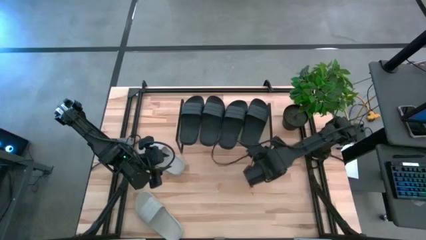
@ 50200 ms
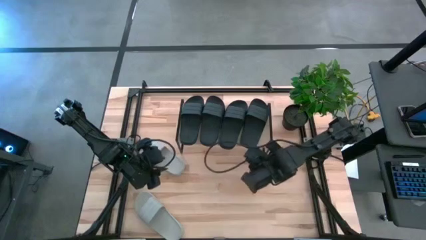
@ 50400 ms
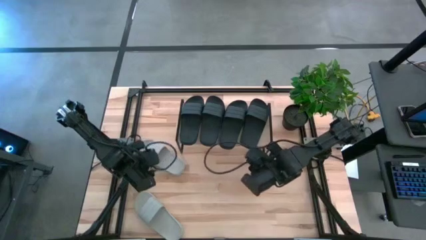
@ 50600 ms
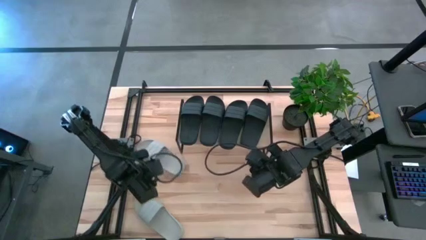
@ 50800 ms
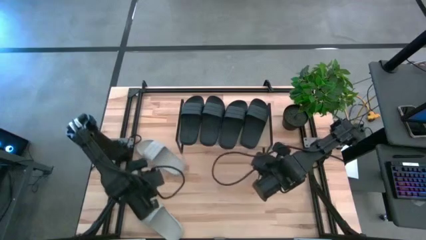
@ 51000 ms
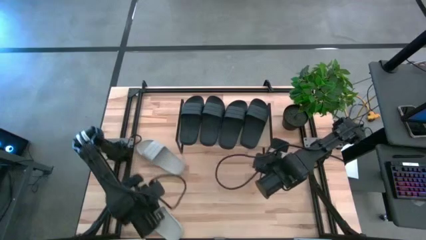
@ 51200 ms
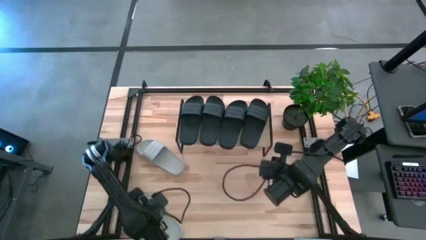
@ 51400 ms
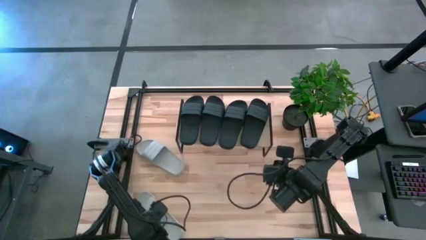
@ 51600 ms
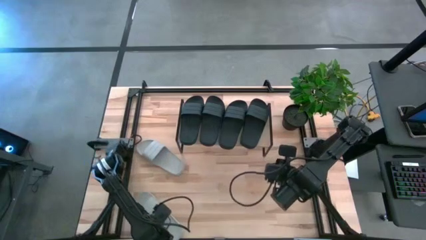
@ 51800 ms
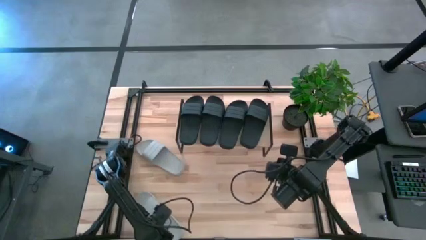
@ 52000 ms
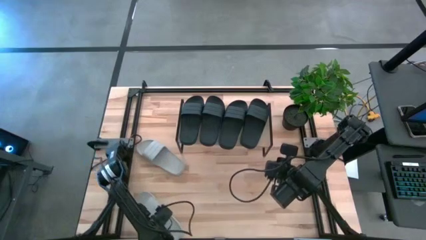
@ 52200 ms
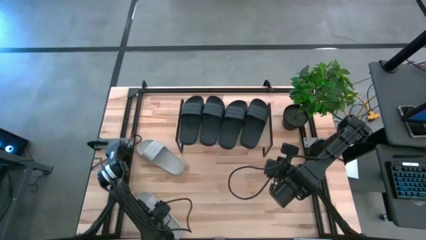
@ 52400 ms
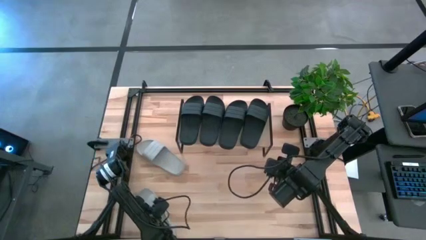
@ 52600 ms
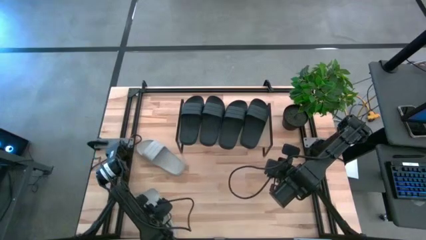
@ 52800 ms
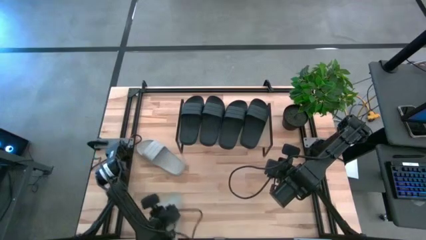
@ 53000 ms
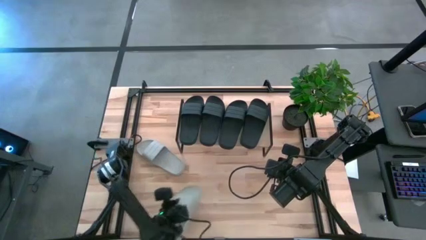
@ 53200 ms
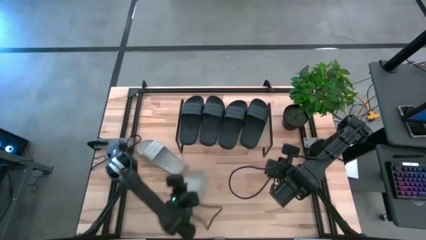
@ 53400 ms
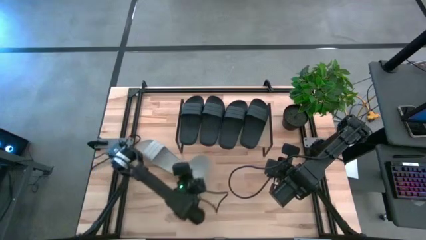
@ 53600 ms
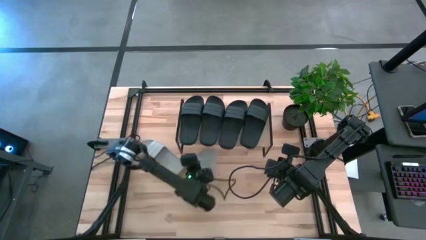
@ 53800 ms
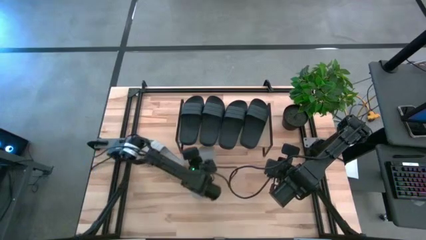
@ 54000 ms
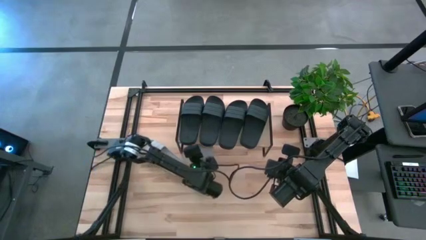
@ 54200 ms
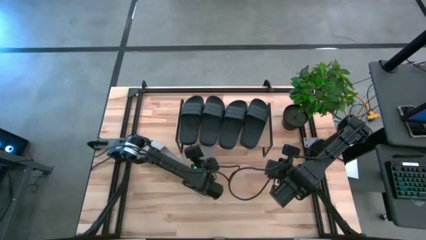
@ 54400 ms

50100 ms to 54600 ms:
Task: Pick and place slides into the shelf
Move the gray slipper to the center of the table

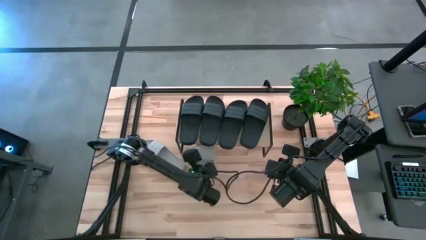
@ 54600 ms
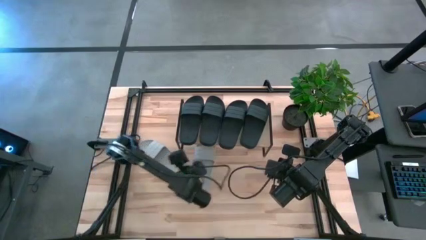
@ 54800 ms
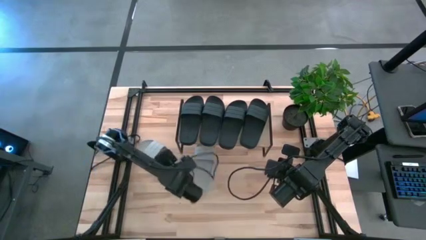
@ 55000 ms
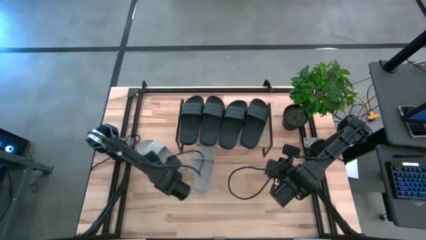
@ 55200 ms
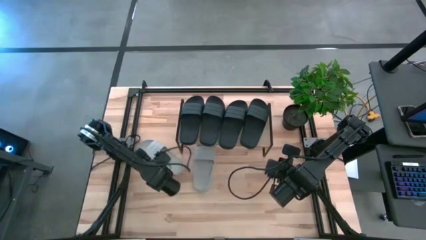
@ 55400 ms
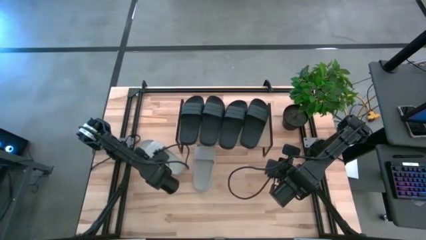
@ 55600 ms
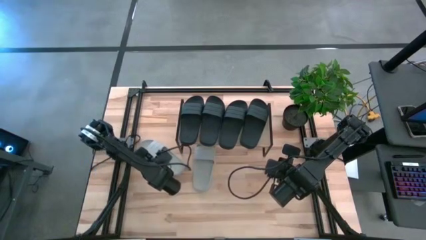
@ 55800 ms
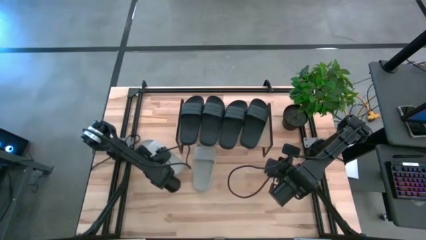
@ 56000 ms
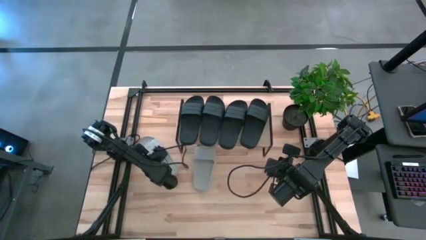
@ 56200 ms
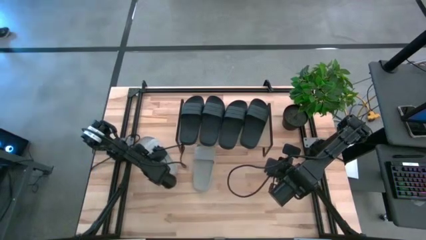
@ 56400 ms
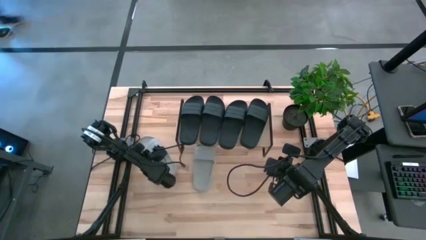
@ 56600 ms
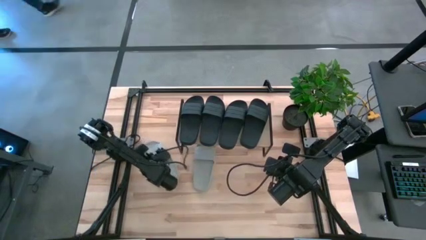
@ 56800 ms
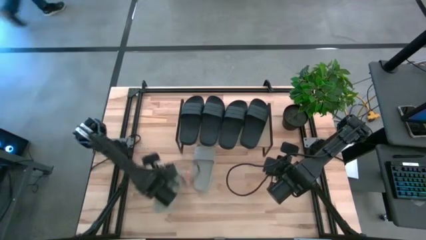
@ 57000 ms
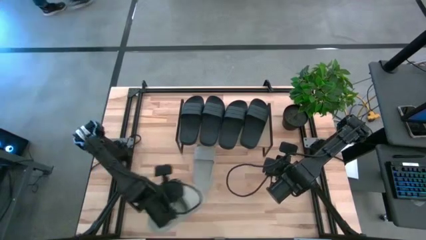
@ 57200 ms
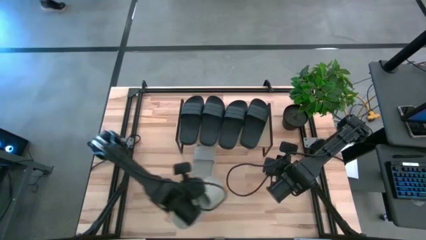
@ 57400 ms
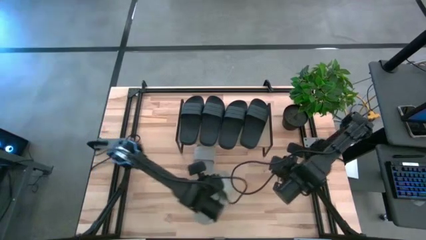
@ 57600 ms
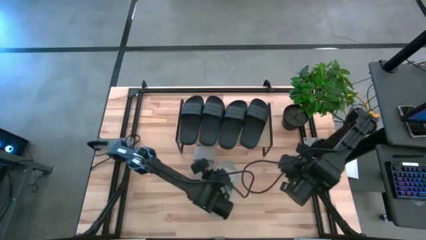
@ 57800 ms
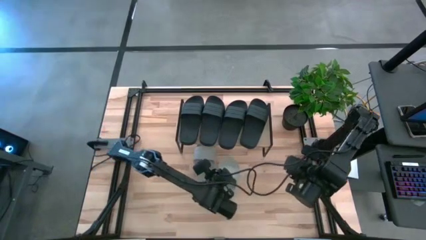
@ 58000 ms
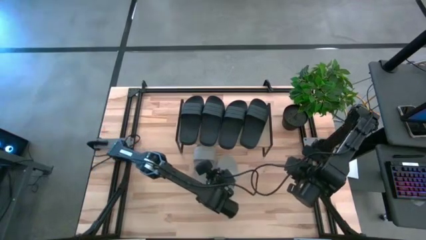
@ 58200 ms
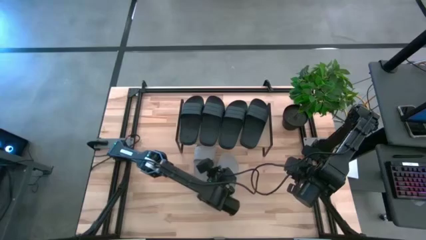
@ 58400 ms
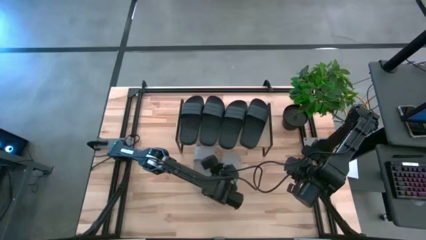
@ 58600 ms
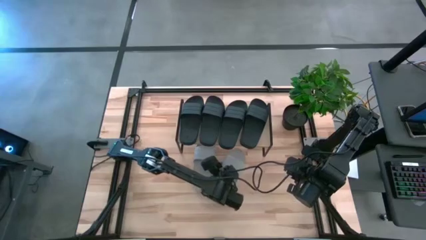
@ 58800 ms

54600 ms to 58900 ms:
Move the gray slipper to the center of the table

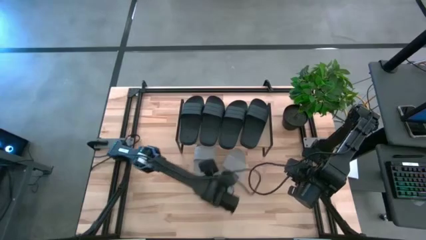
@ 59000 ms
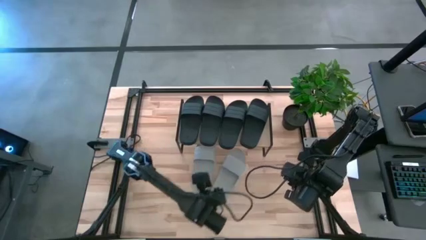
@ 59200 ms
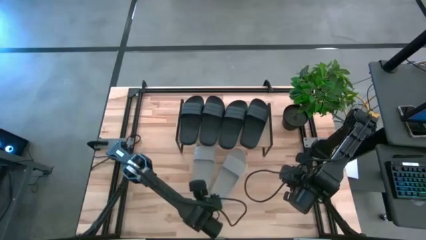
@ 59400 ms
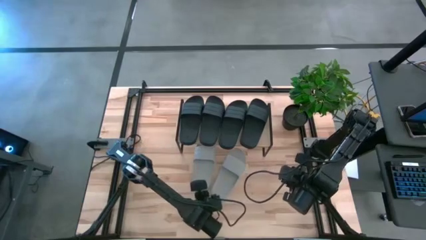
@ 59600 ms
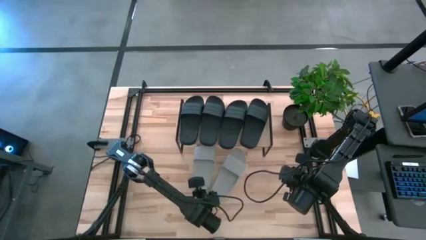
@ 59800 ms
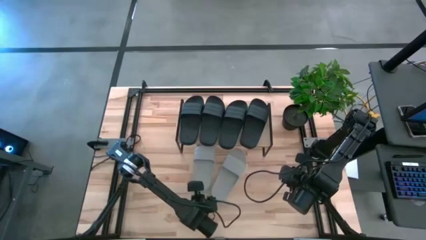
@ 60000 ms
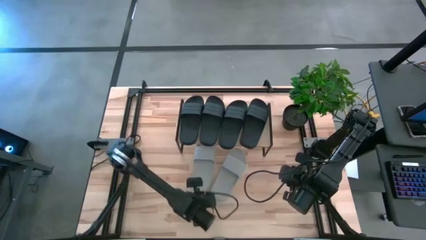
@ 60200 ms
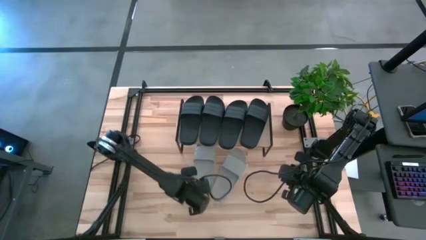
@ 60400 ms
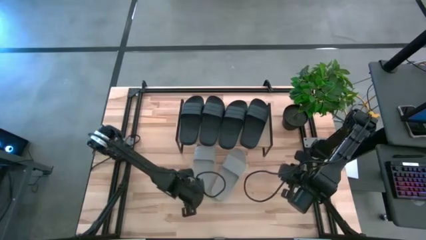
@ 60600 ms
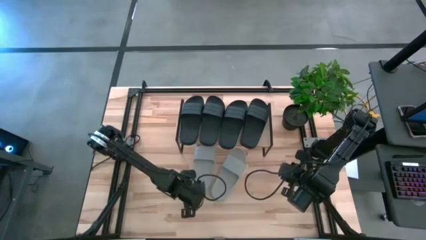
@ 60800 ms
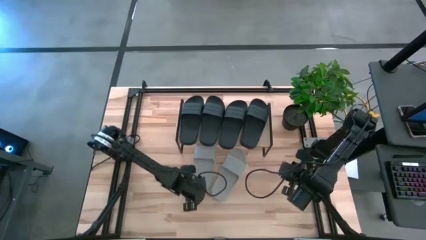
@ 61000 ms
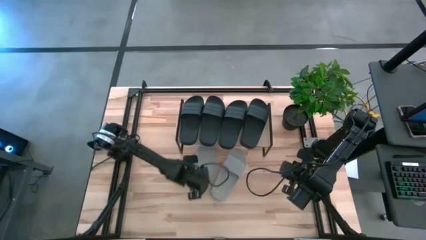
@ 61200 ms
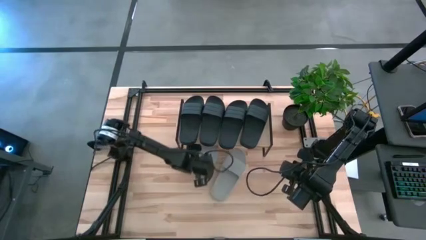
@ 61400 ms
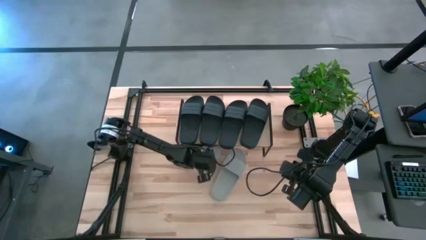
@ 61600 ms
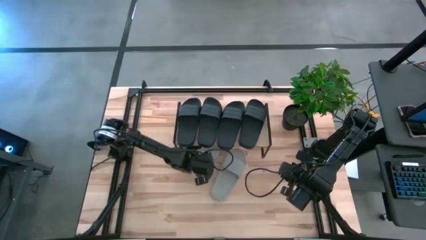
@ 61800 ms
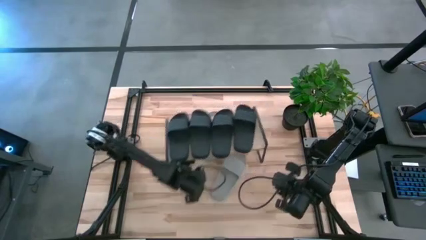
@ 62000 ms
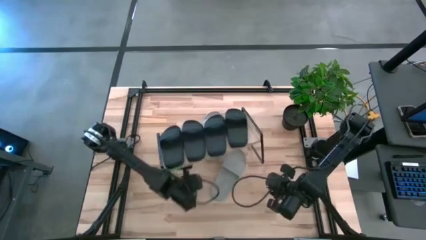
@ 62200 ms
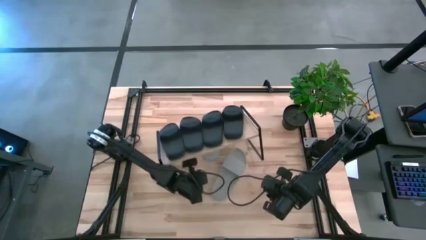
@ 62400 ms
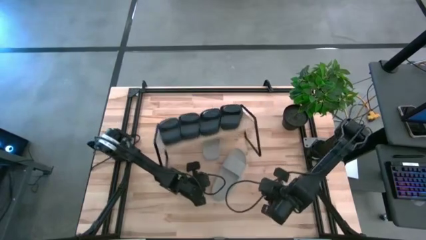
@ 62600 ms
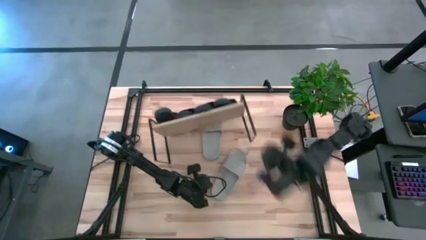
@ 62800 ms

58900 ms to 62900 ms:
Adjust the gray slipper under the shelf

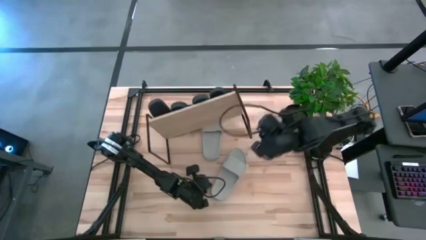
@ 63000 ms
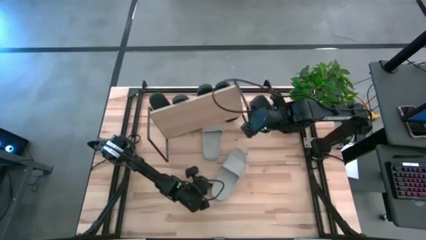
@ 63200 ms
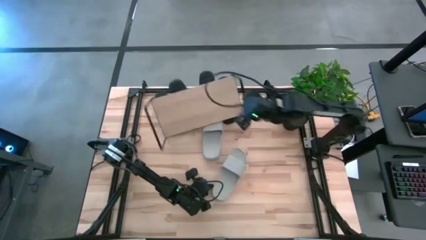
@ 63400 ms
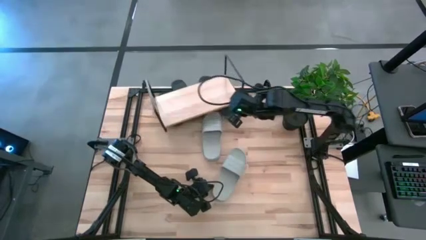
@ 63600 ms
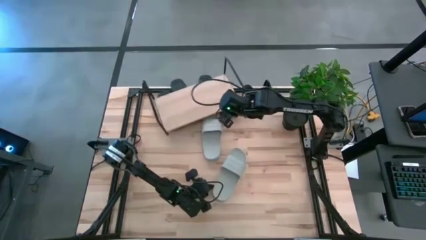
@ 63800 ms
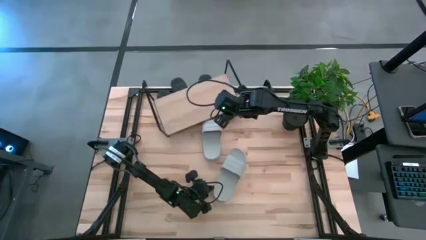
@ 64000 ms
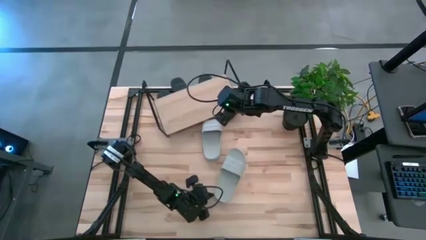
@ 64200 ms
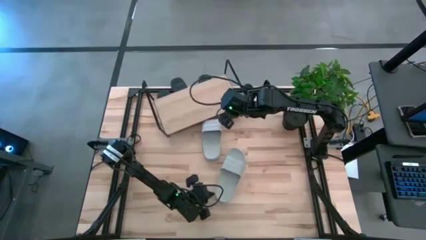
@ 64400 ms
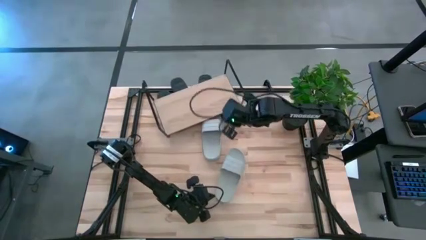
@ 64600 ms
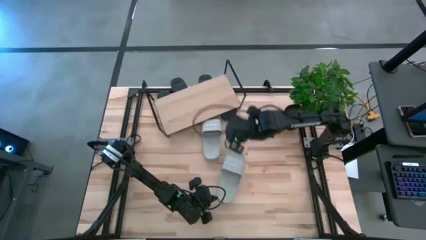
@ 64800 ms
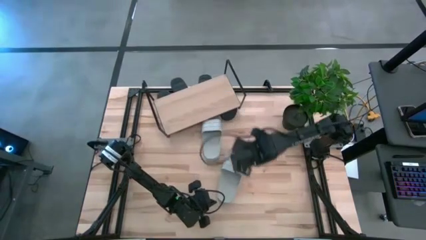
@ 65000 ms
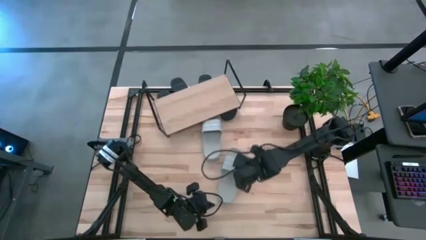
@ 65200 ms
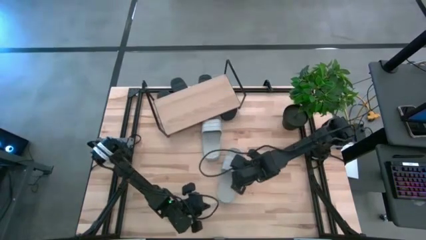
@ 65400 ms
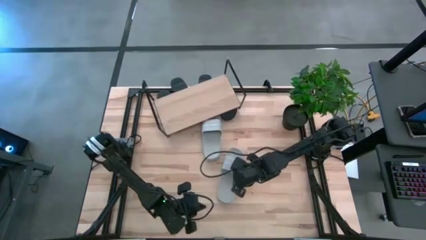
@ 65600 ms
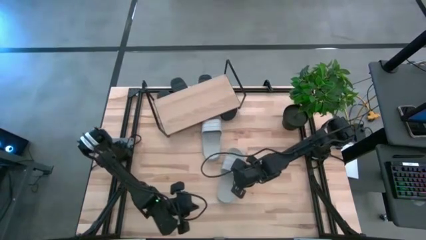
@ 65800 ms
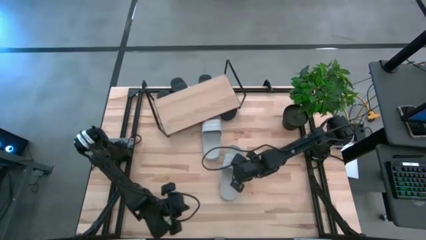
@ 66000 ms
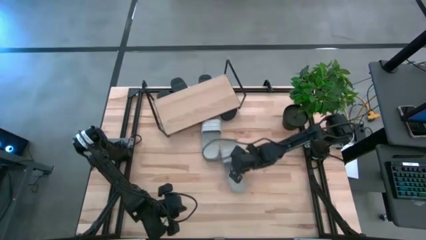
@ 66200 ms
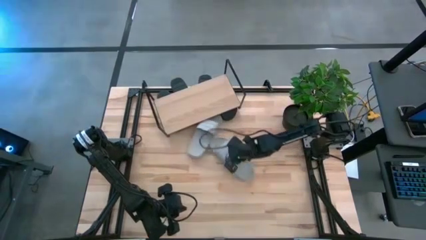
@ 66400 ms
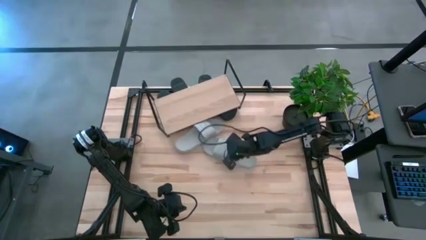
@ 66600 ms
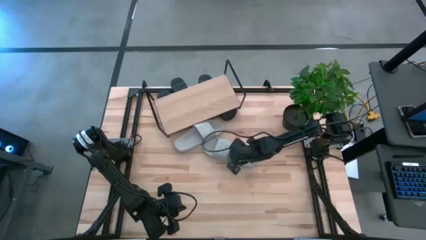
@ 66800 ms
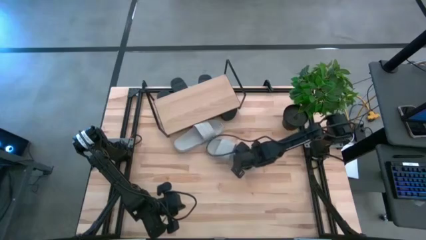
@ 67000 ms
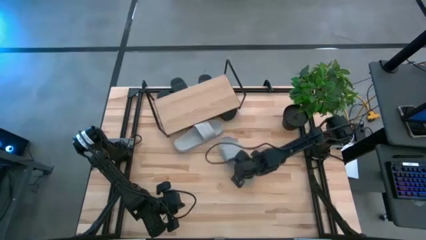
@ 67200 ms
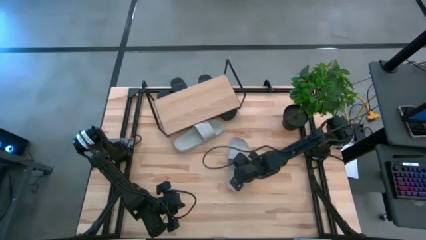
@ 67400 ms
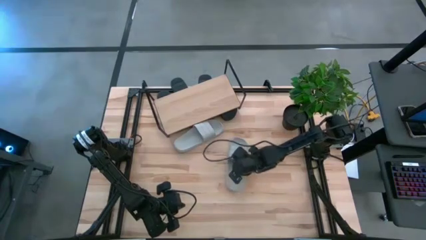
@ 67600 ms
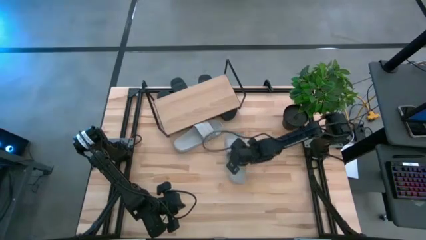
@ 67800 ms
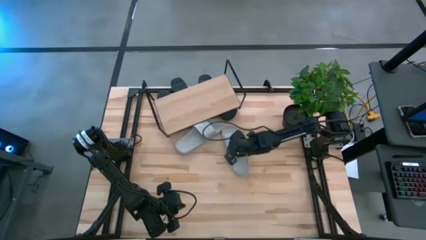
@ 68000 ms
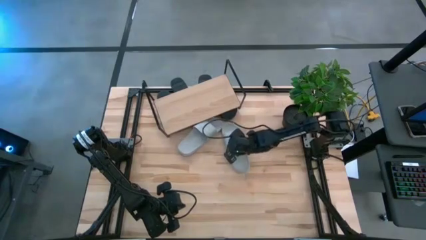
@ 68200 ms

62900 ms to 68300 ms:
Move the gray slipper to the top center of the table
